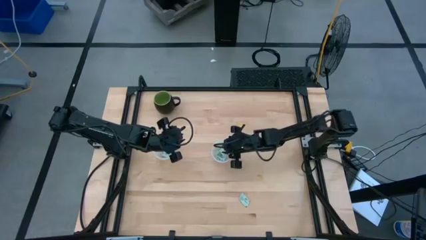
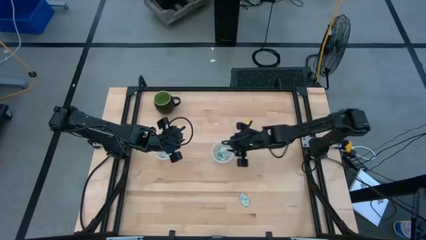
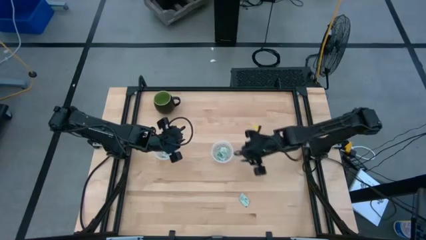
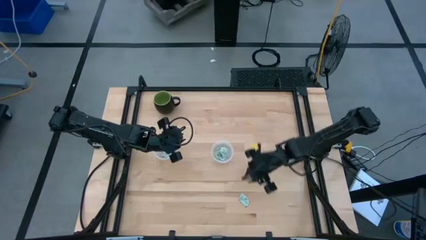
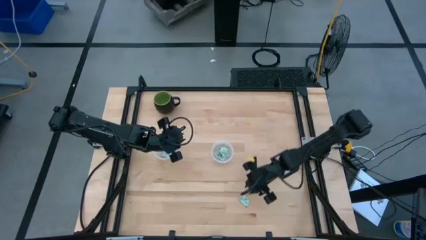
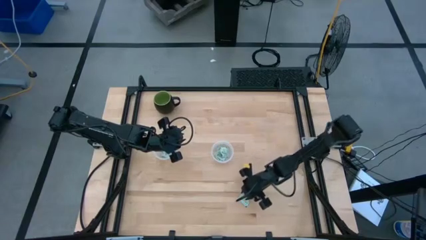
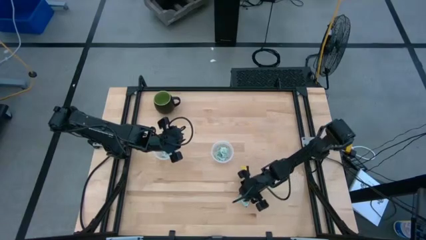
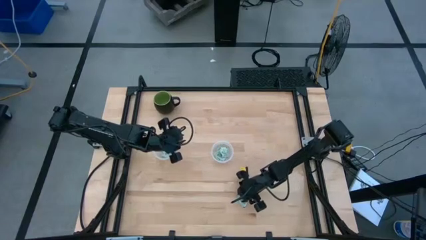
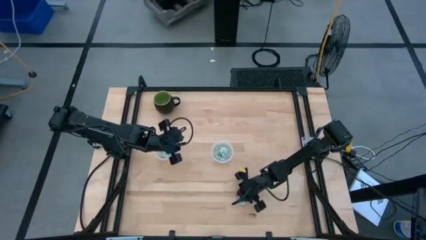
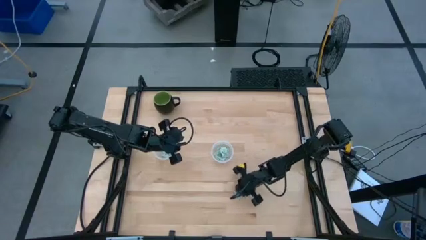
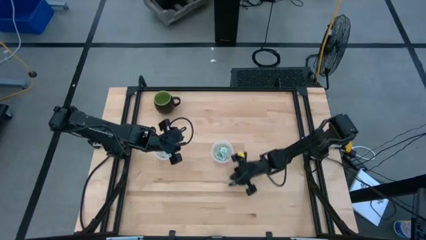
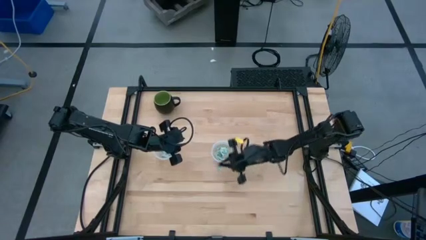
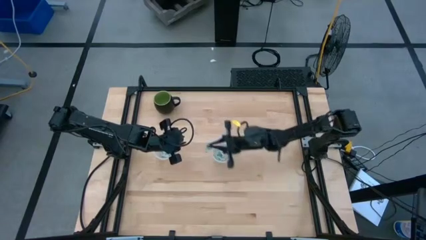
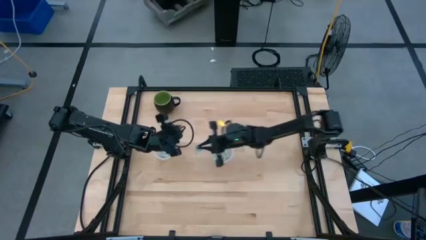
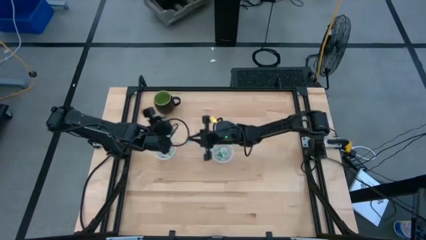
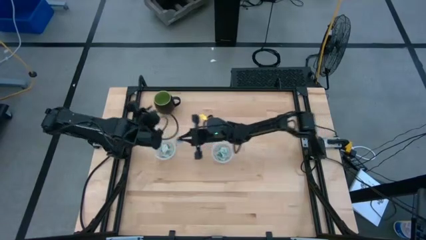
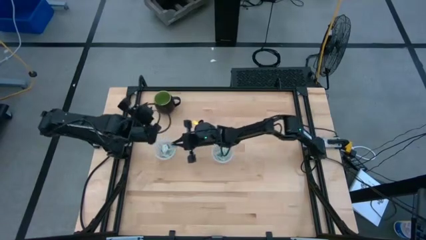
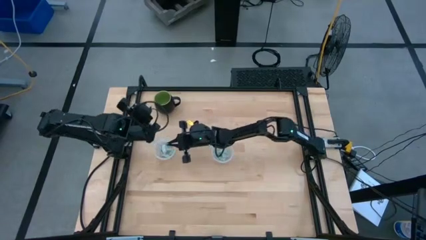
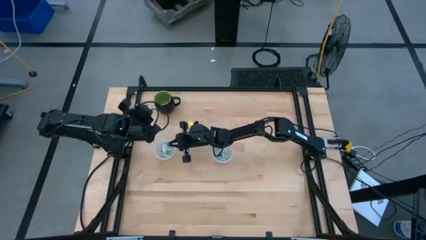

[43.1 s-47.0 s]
Task: Pick and place Stevia / Truvia into bins
Put the white stevia packet into the left transparent container

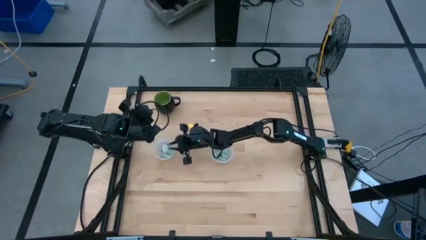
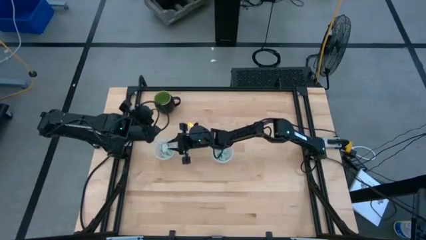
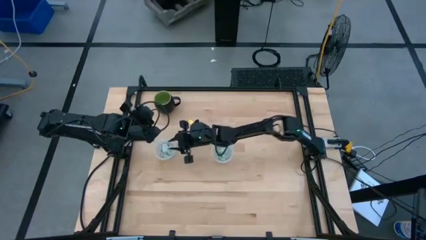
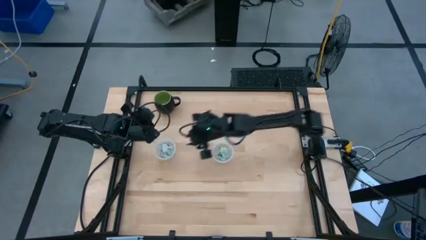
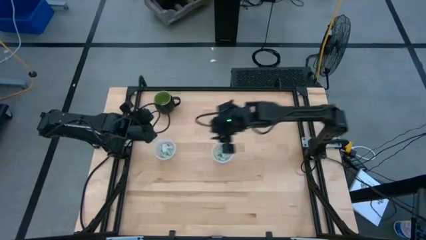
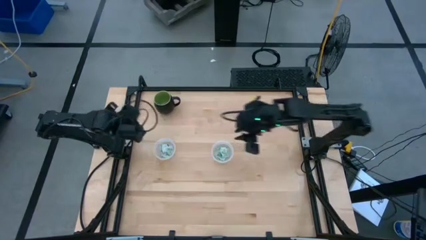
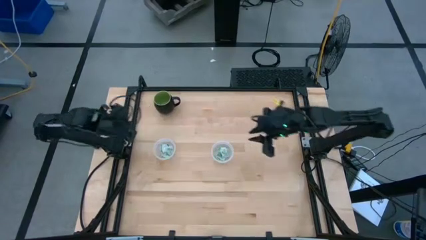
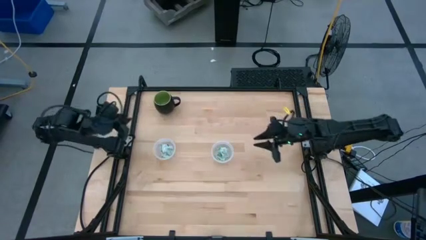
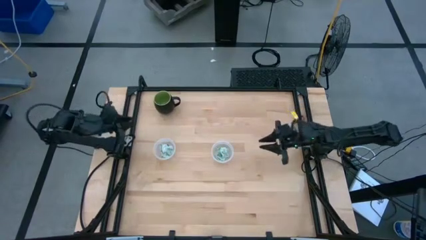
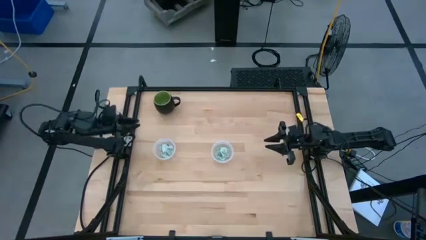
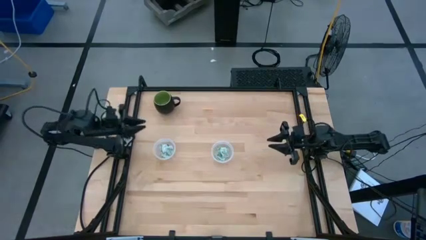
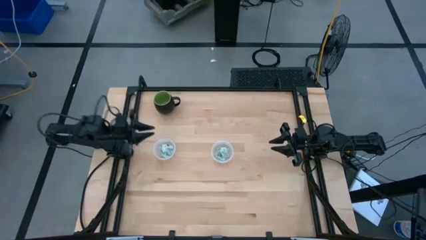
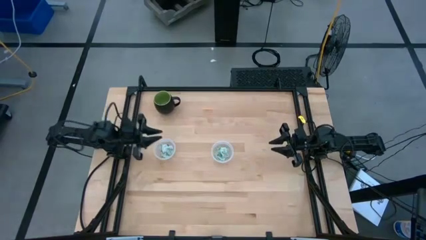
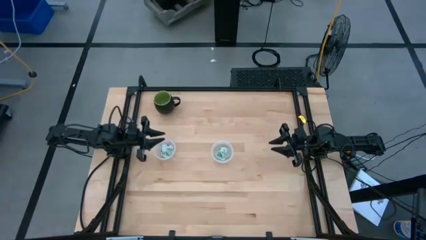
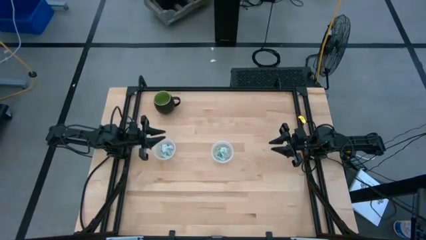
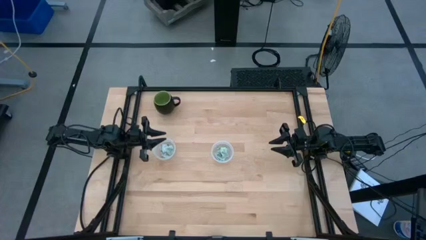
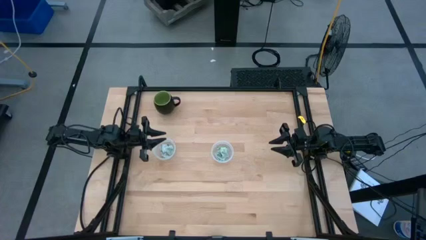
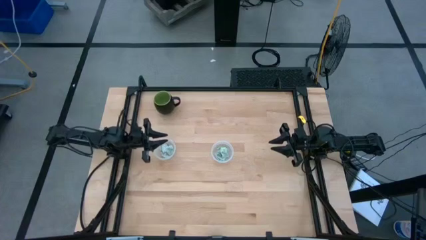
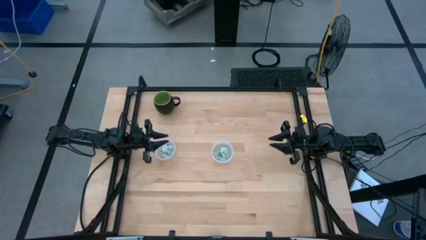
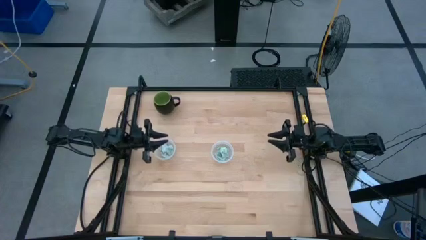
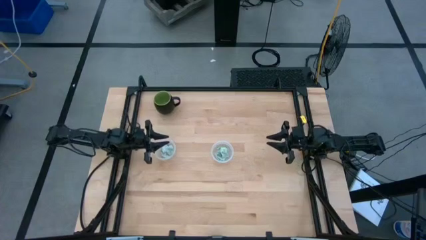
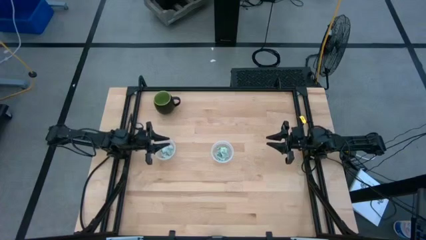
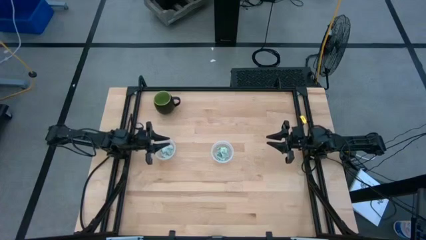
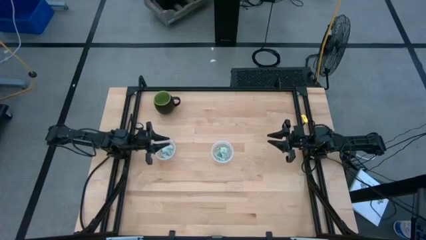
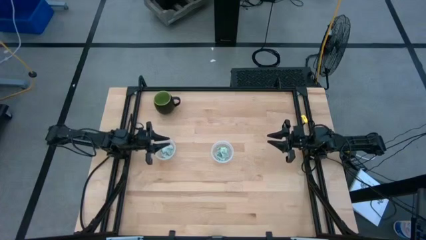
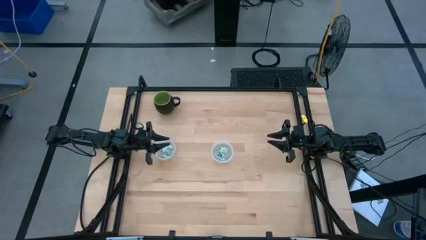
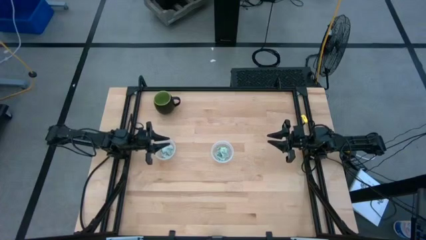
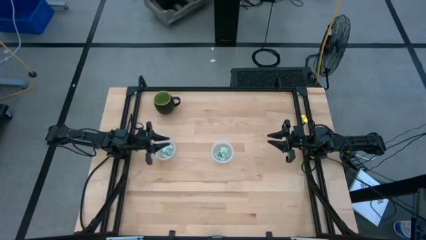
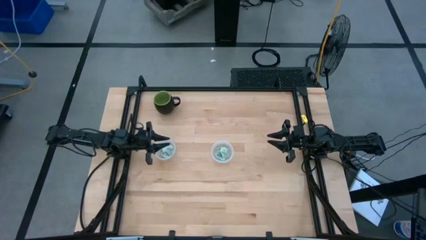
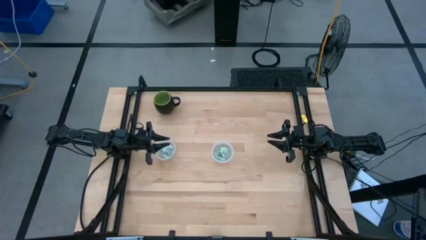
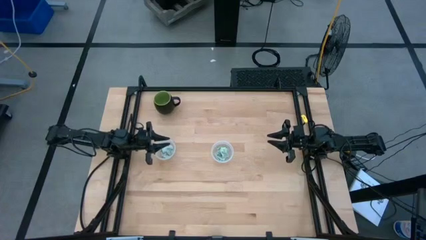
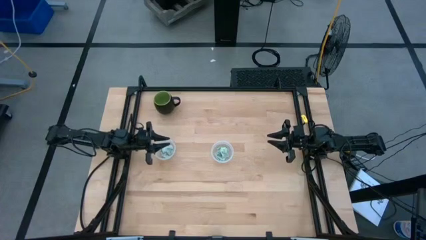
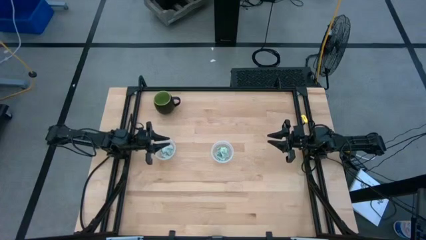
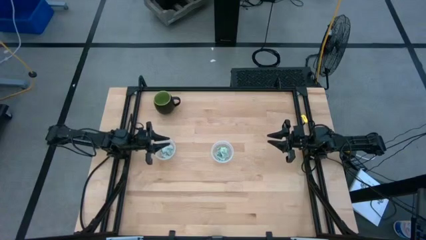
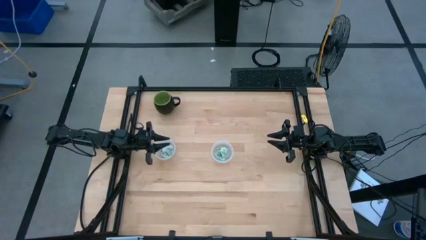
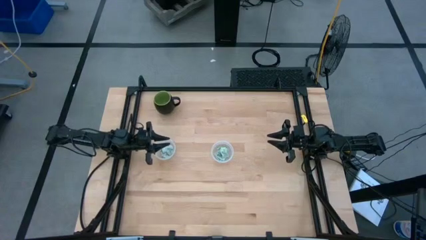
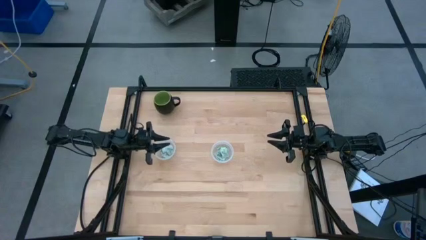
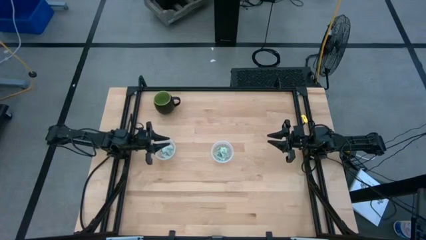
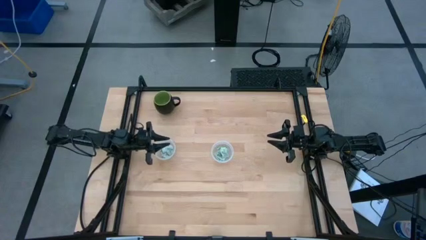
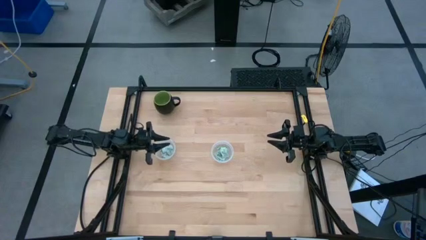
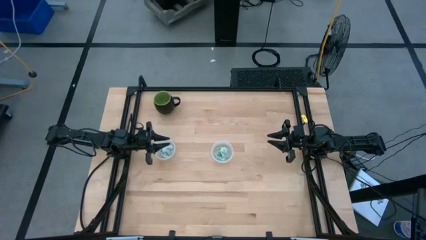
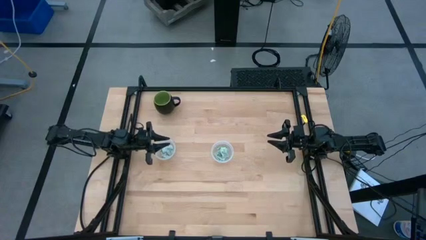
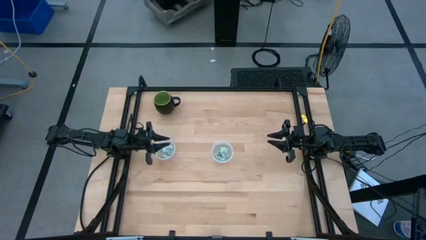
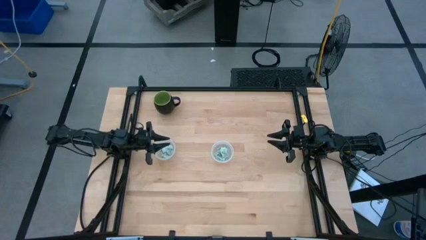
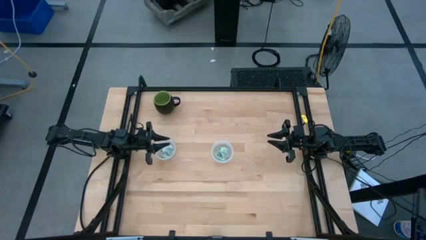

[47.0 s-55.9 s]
Return to Home Position

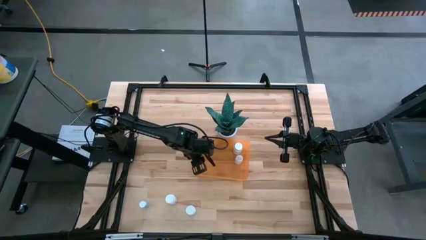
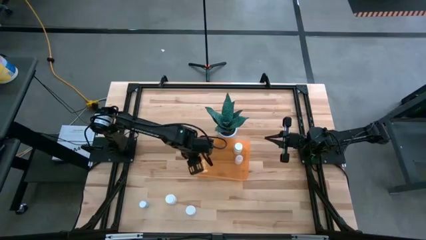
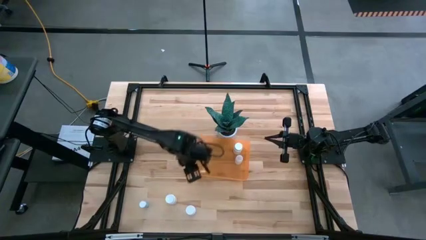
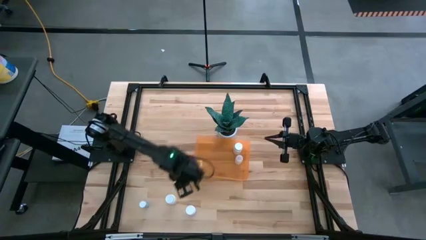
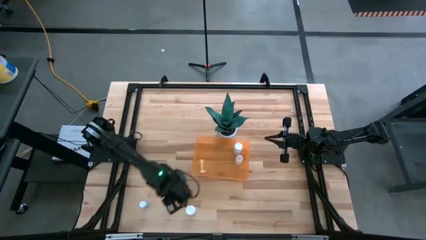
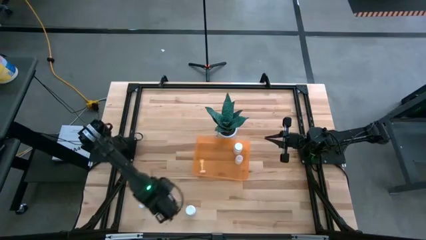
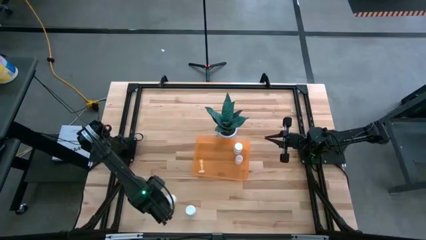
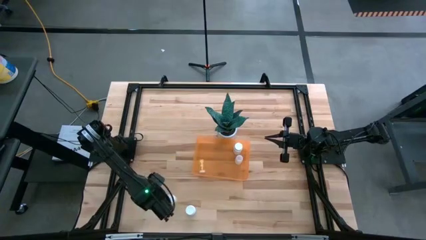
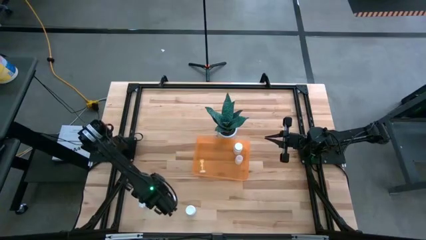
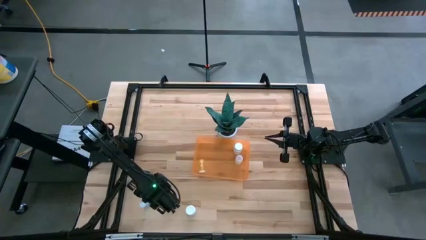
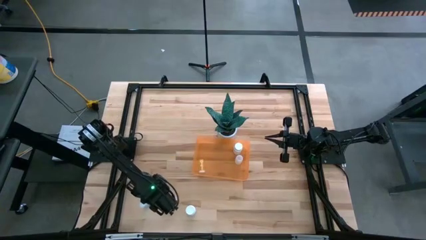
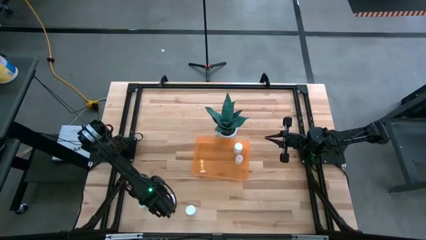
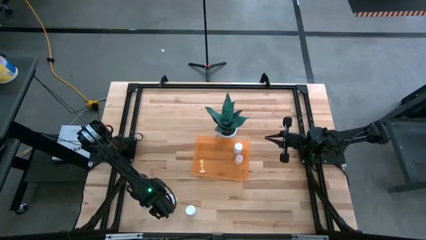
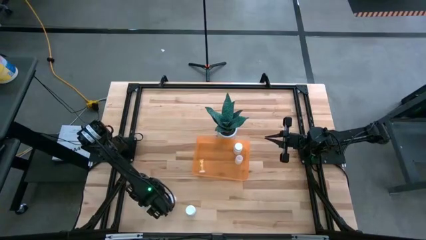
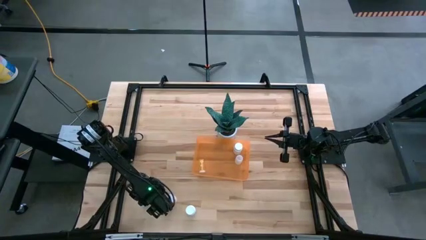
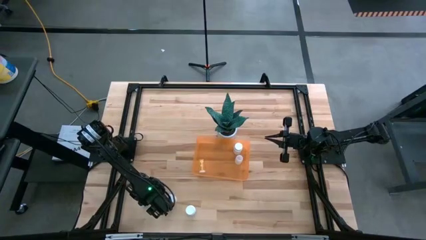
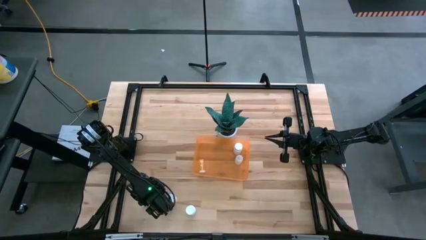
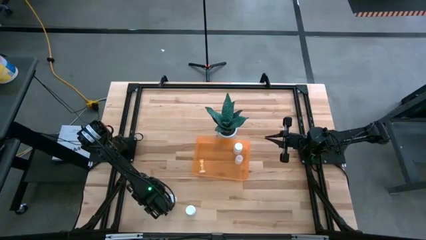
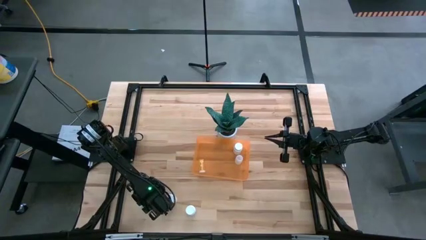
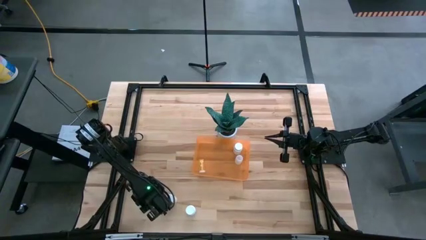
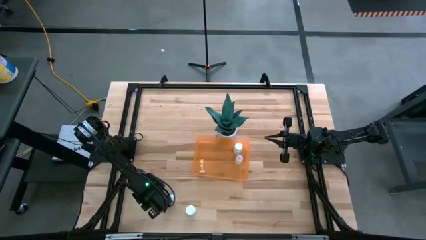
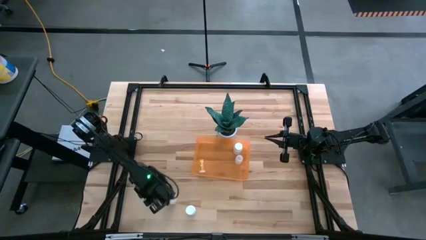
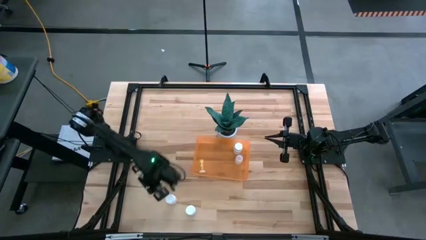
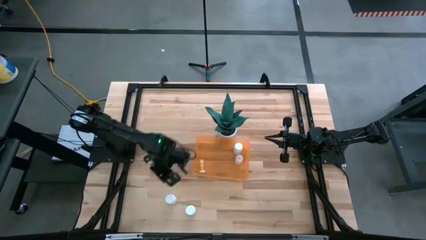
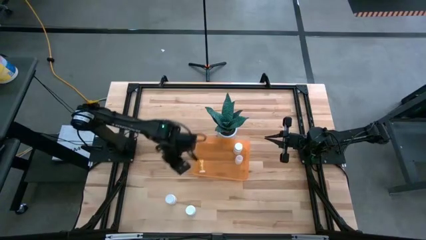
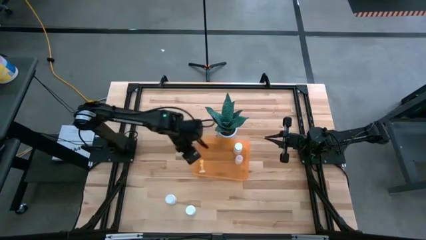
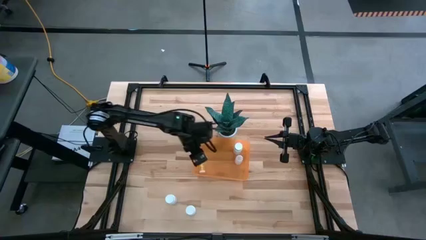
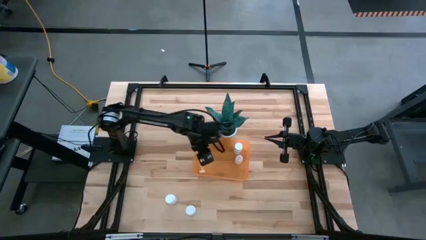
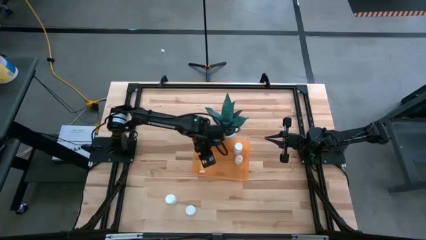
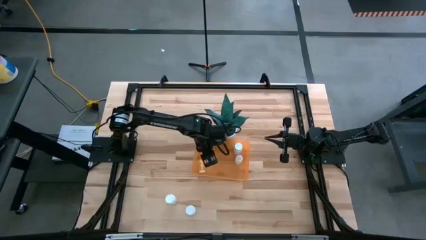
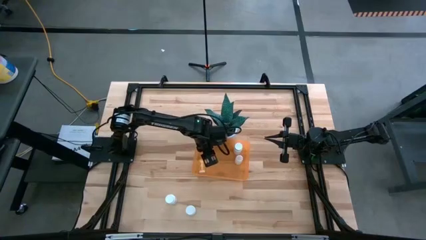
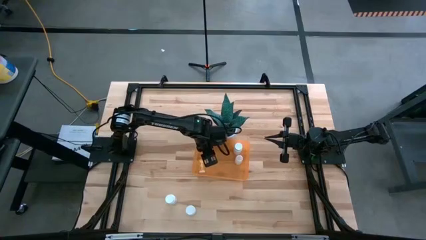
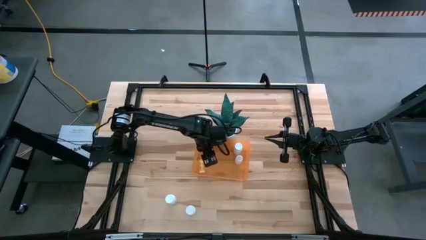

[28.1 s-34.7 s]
Task: Pick and place pill bottles into a basket
Put the blue pill bottle into the orange bin
